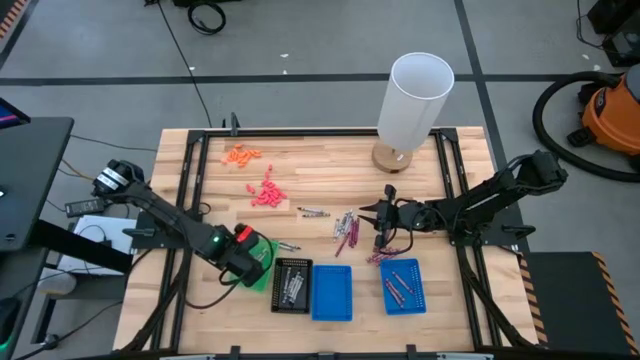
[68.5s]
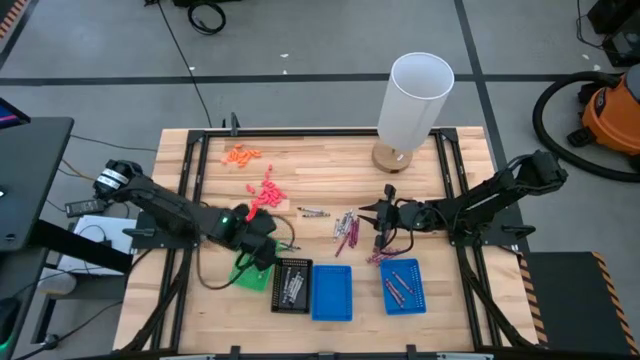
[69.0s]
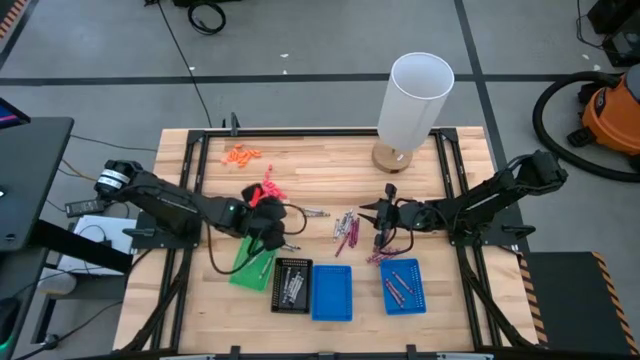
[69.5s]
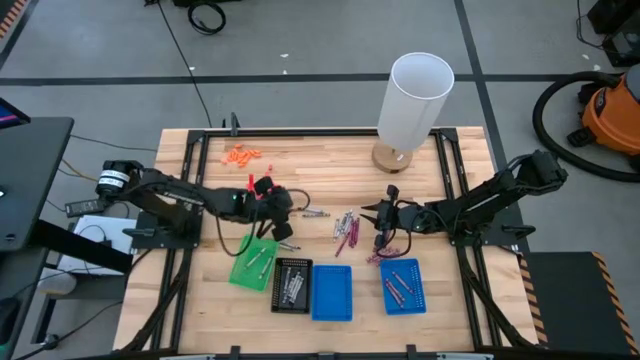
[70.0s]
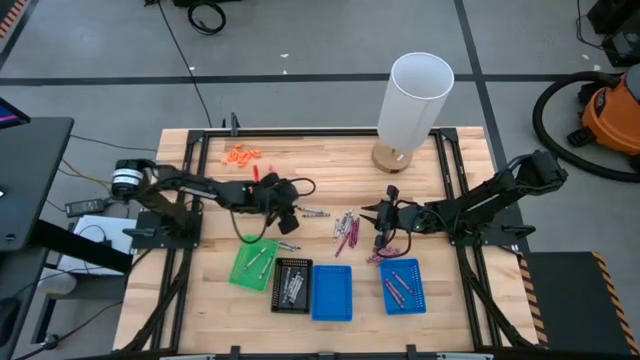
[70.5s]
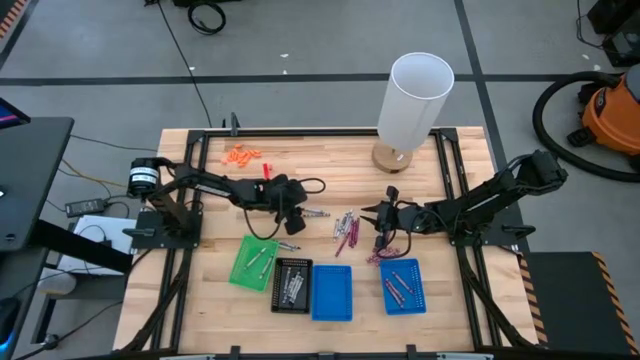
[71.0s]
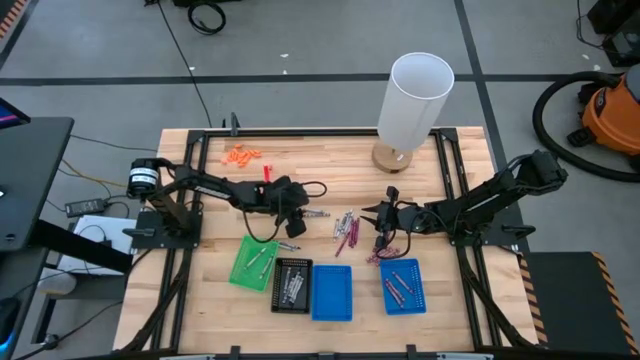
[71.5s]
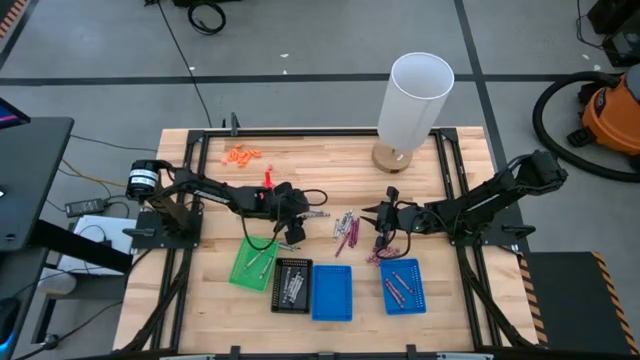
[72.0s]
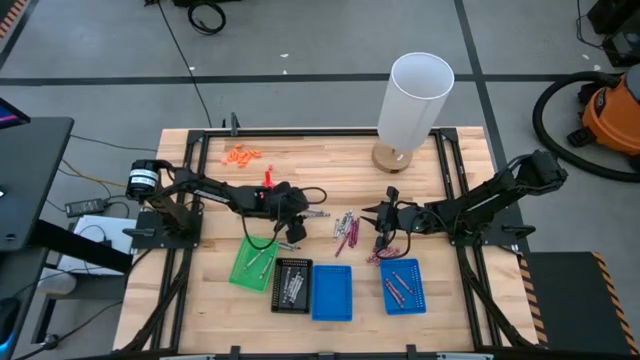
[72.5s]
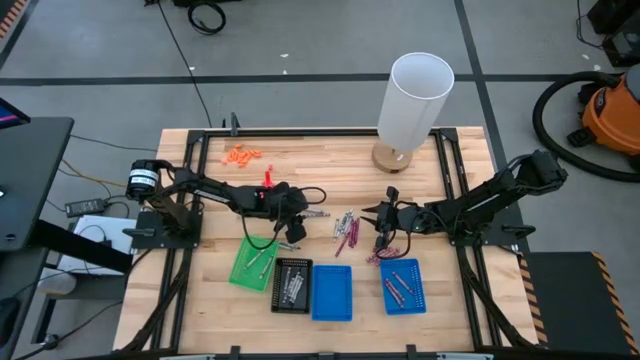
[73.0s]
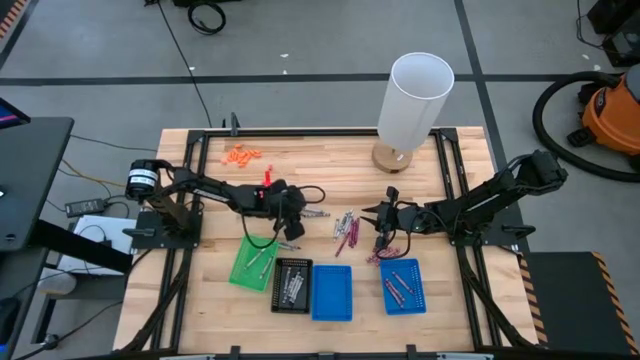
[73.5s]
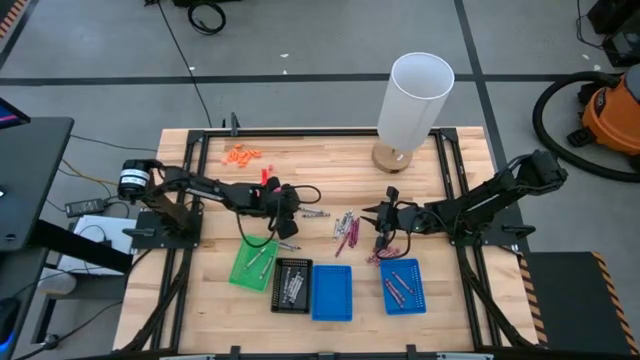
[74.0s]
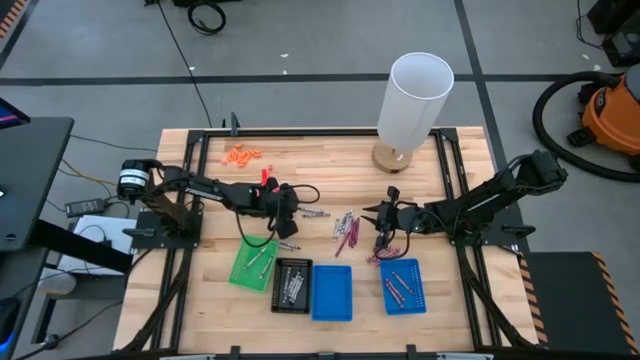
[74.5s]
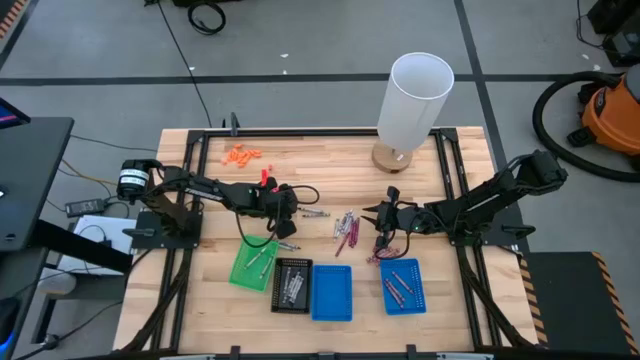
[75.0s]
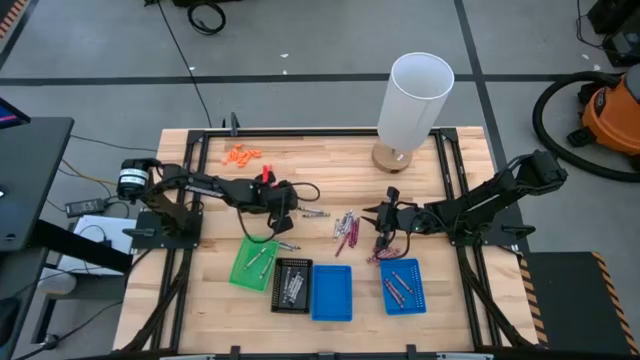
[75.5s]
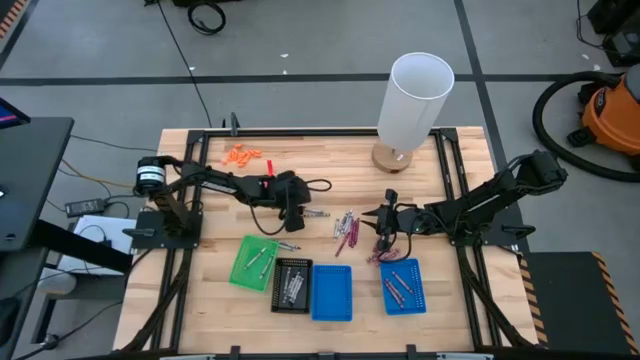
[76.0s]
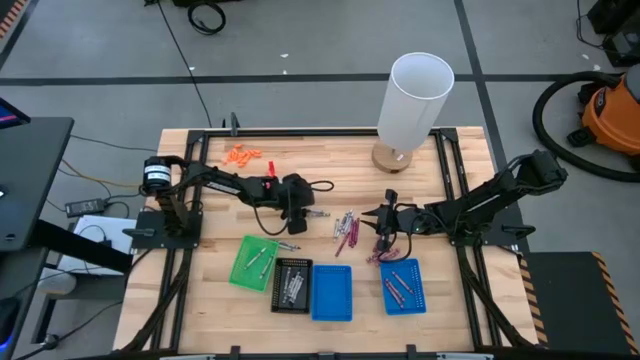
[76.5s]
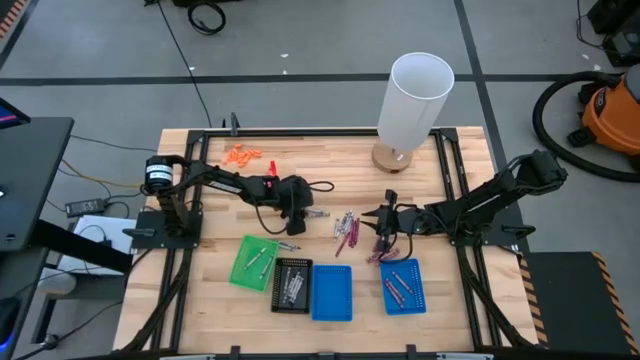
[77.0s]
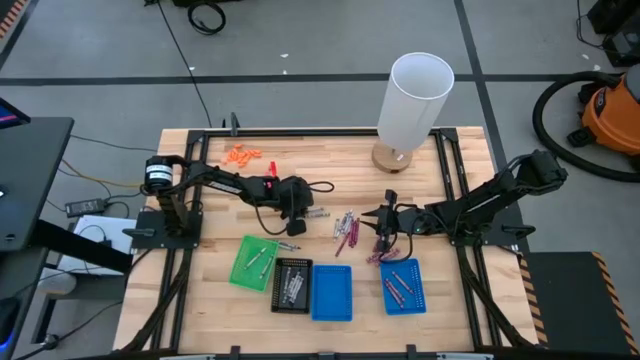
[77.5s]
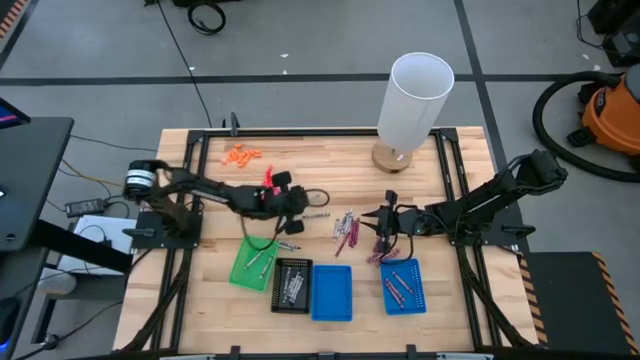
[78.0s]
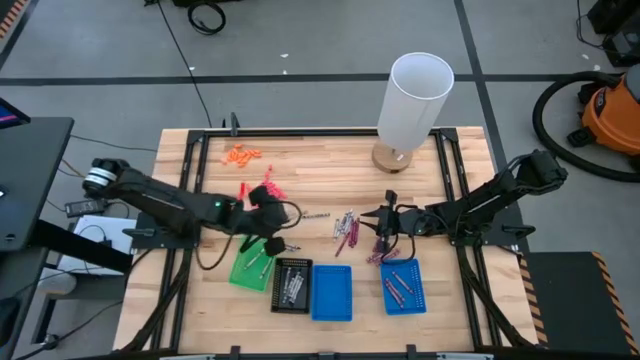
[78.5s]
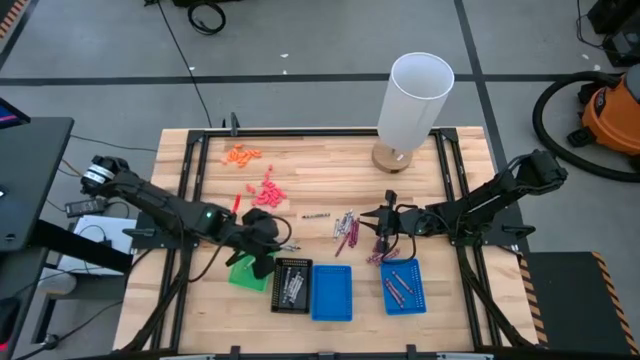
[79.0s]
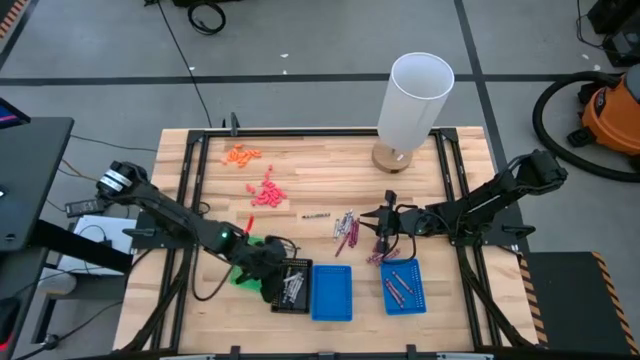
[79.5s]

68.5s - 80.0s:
Task: Sort crayons
Put the black crayon into the black bin

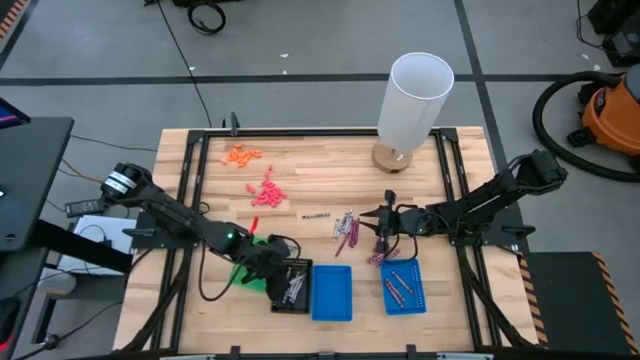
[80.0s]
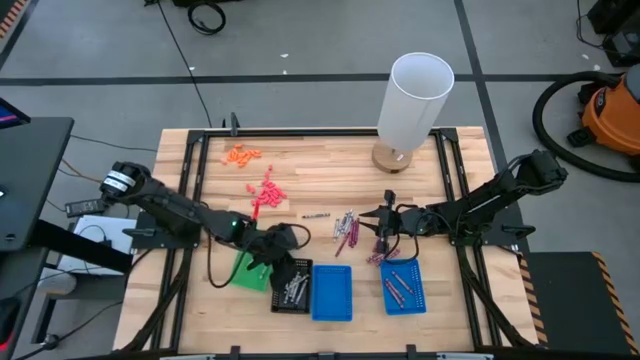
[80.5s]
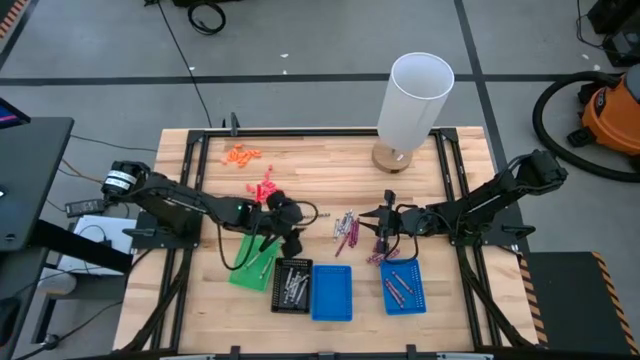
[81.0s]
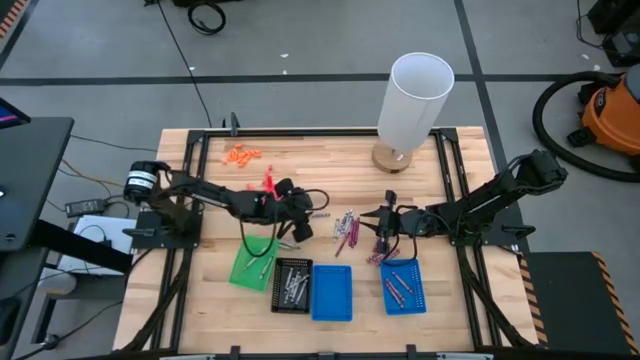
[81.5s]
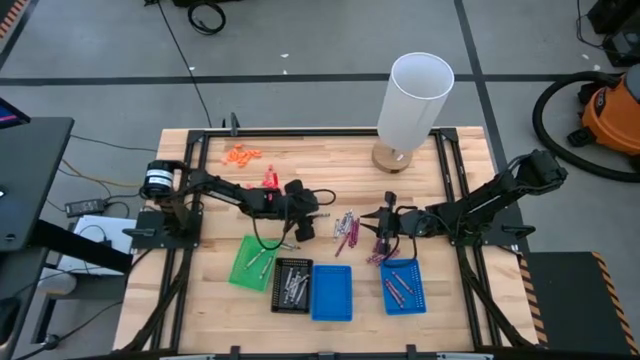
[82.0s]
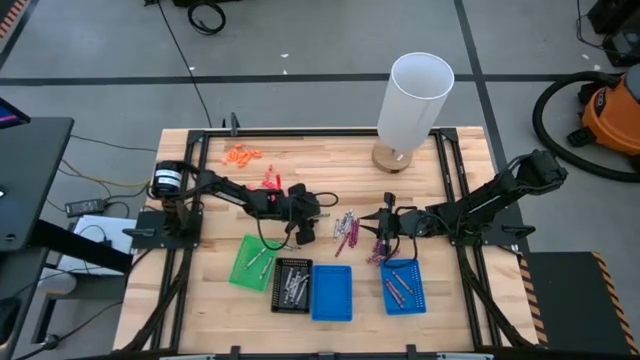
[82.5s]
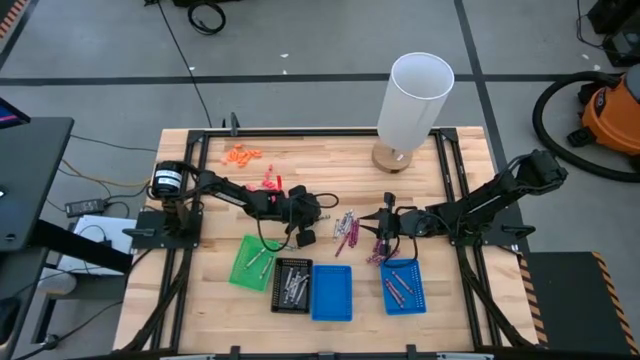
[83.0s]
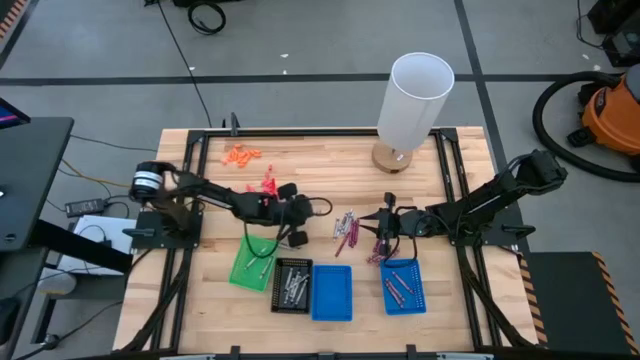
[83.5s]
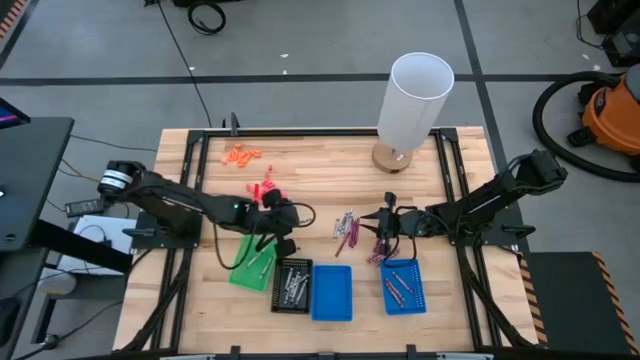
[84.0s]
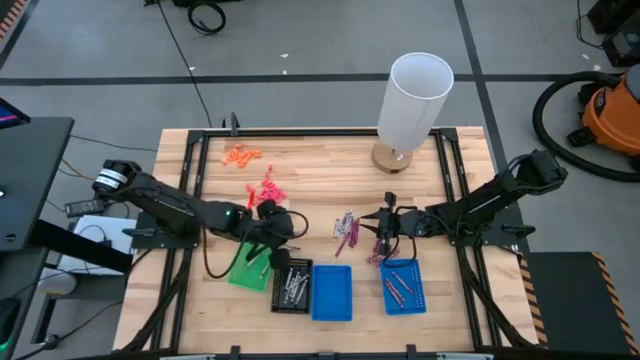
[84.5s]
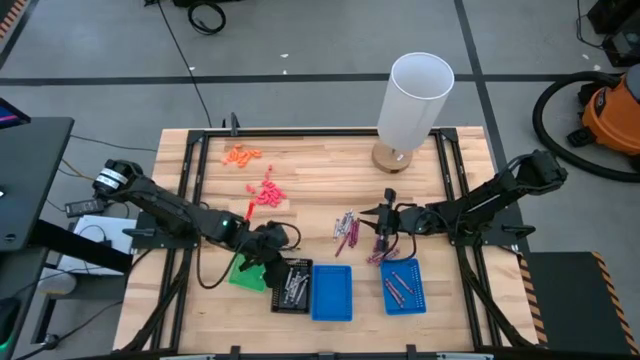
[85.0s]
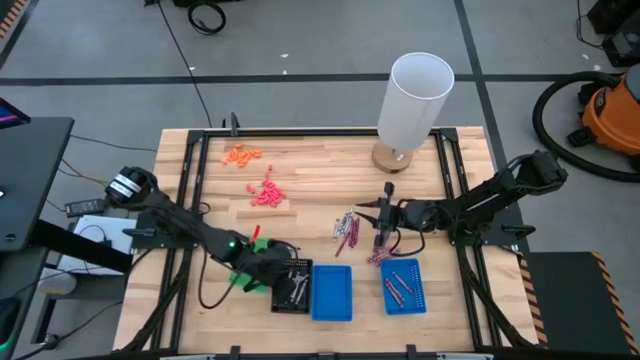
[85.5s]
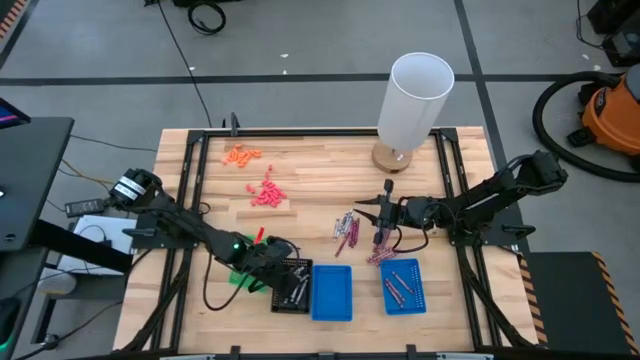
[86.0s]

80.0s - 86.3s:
Put the black crayon into the black bin

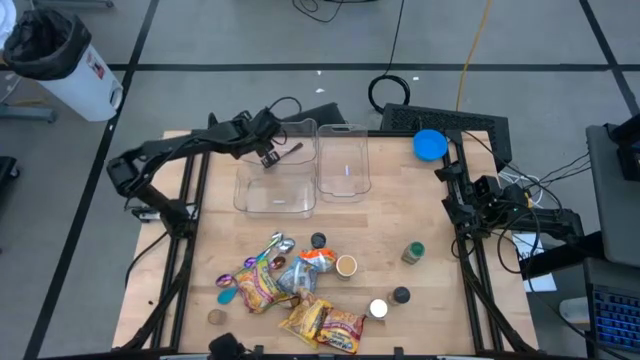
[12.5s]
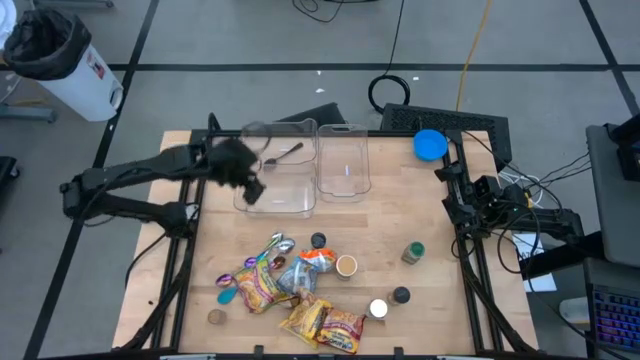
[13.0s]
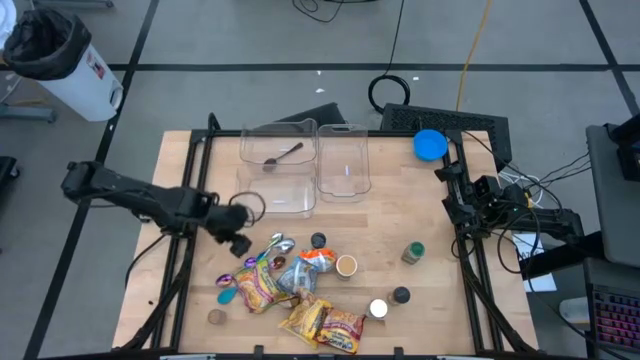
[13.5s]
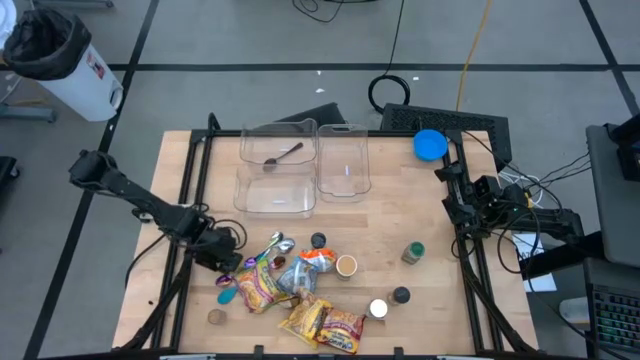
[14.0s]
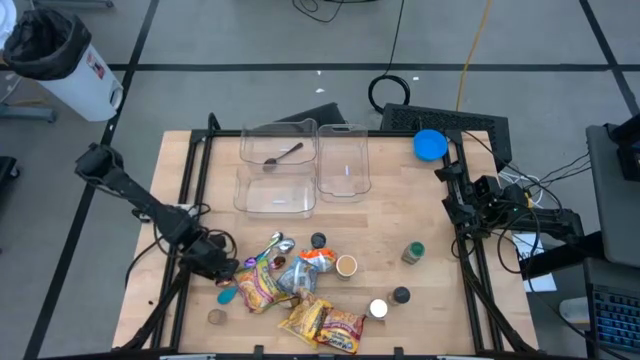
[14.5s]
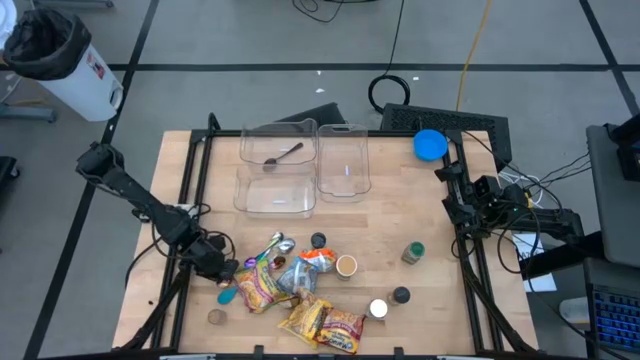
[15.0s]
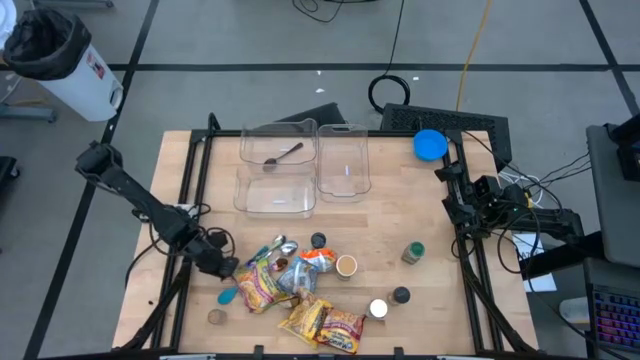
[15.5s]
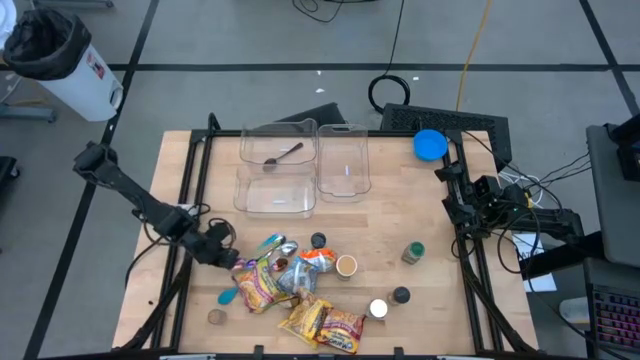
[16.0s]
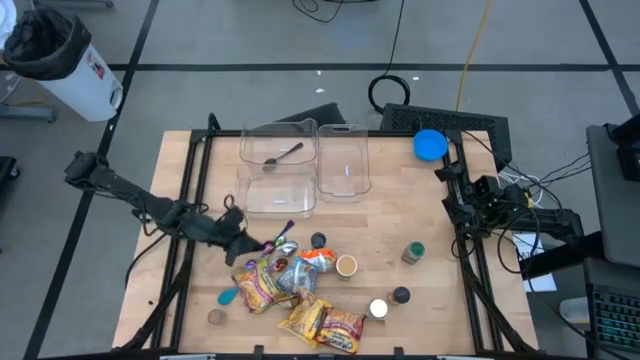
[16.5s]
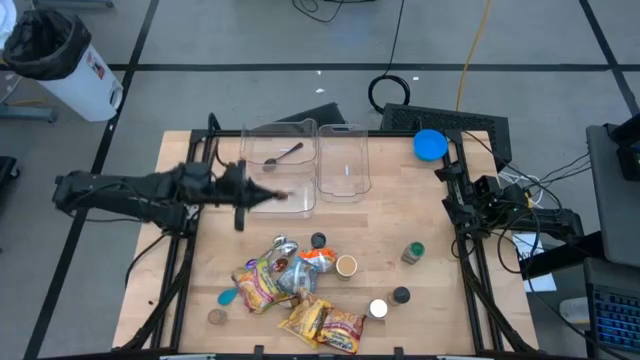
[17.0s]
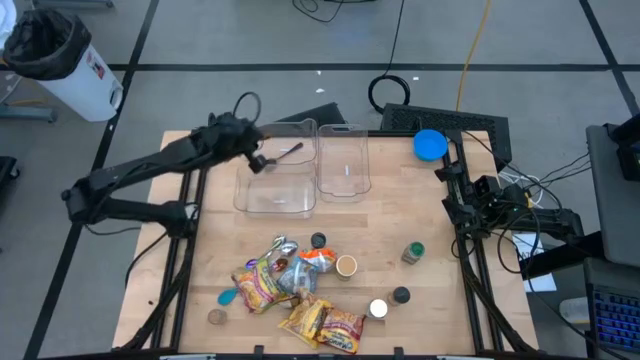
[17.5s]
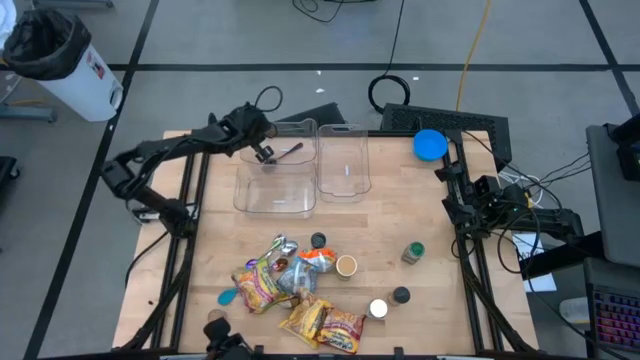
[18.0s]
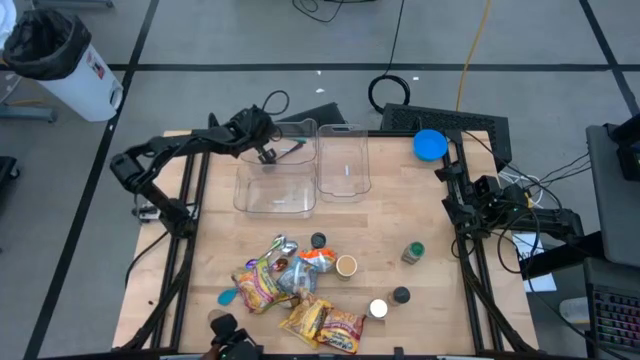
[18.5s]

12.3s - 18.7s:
Task: Pick & Place Food Item
Put the bottom left blue spoon into the top left transparent bin
